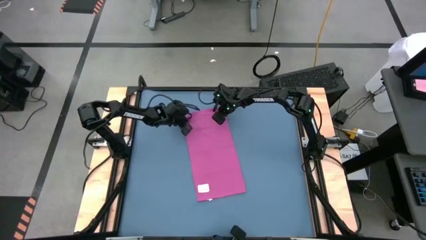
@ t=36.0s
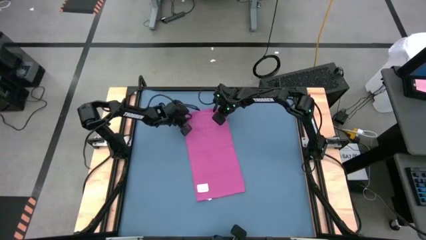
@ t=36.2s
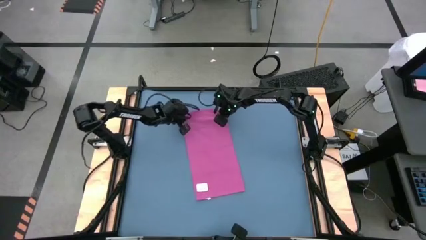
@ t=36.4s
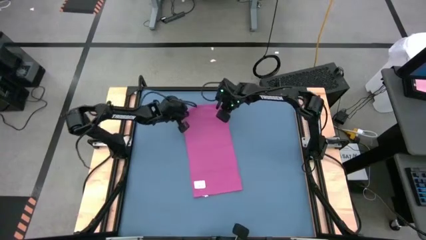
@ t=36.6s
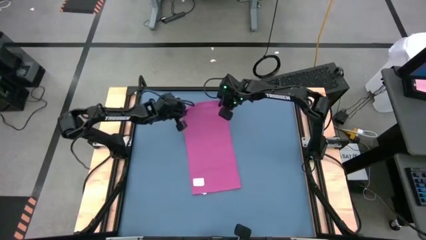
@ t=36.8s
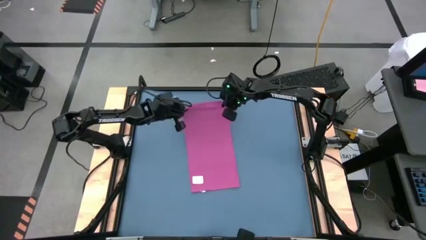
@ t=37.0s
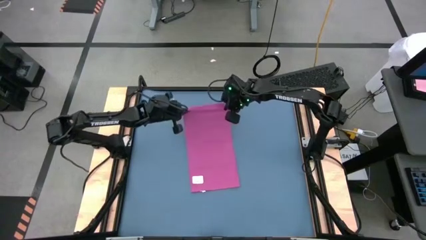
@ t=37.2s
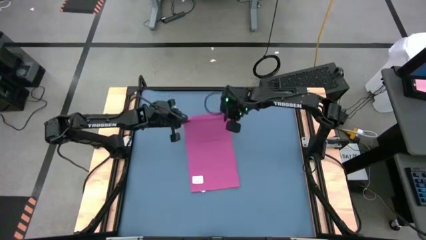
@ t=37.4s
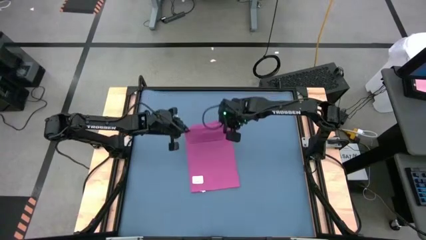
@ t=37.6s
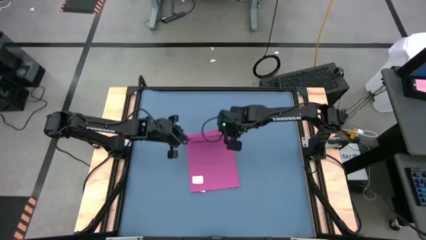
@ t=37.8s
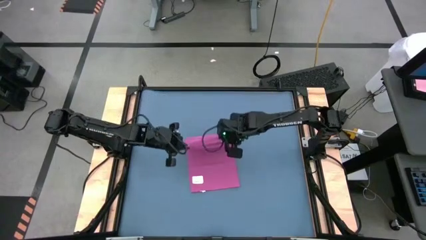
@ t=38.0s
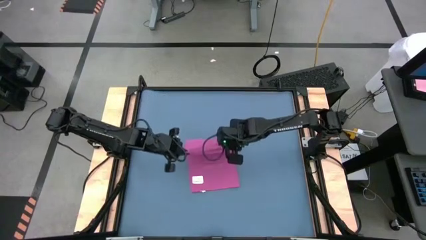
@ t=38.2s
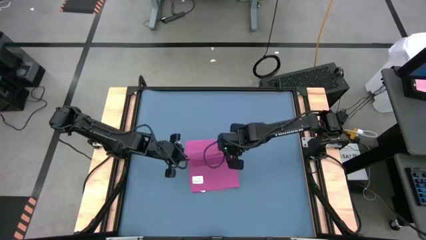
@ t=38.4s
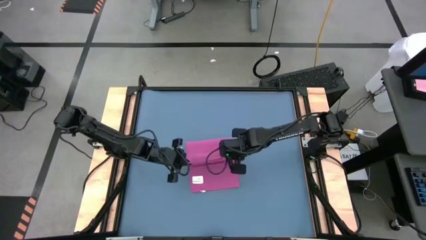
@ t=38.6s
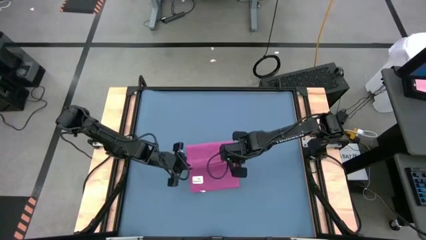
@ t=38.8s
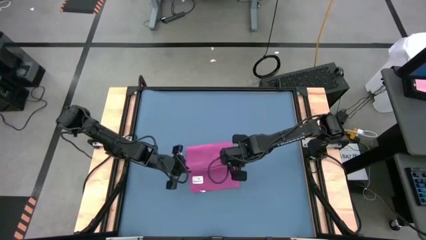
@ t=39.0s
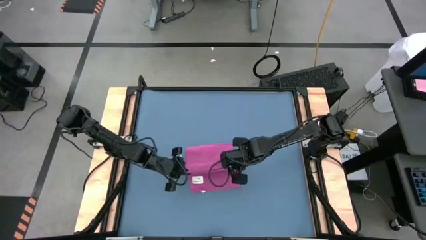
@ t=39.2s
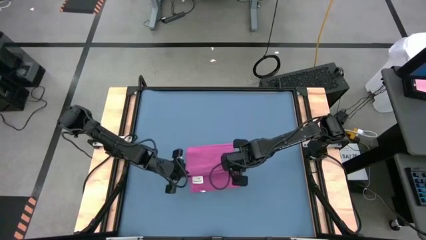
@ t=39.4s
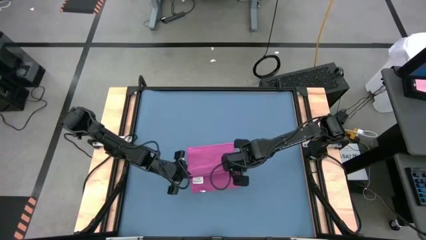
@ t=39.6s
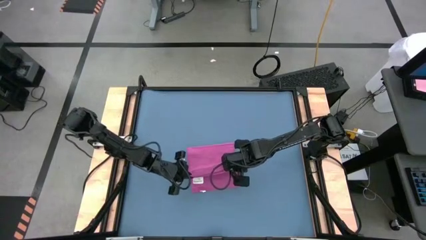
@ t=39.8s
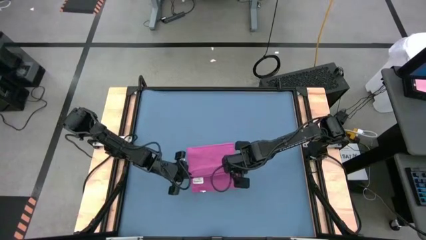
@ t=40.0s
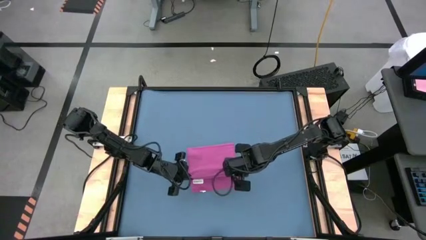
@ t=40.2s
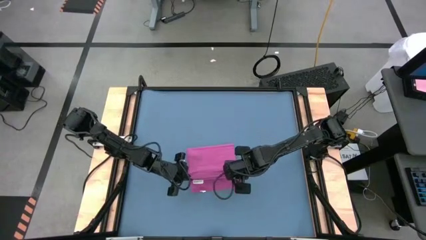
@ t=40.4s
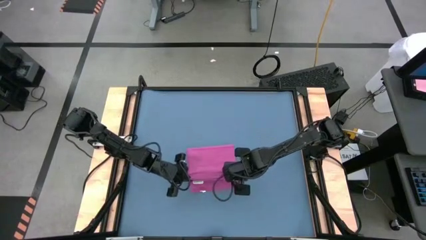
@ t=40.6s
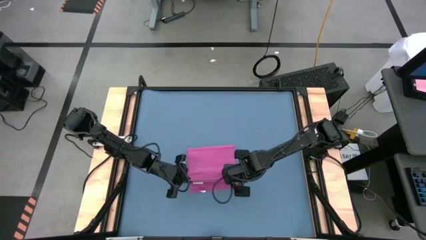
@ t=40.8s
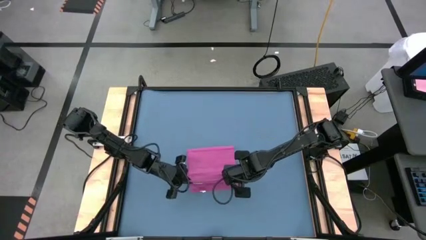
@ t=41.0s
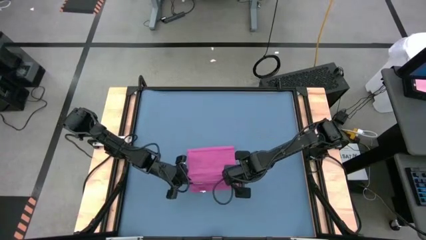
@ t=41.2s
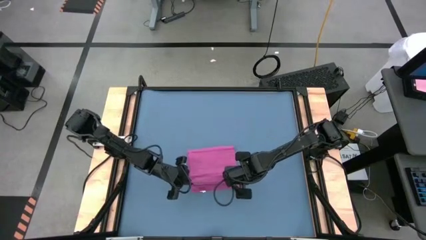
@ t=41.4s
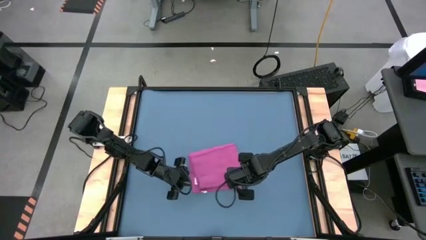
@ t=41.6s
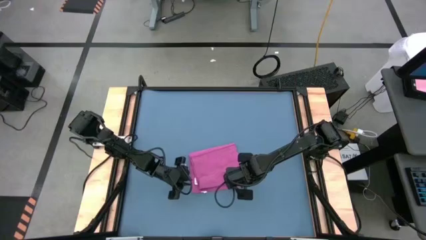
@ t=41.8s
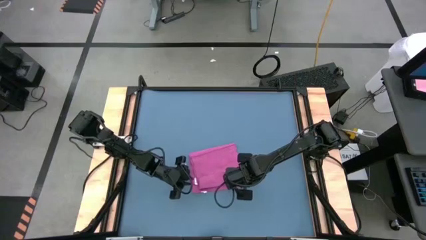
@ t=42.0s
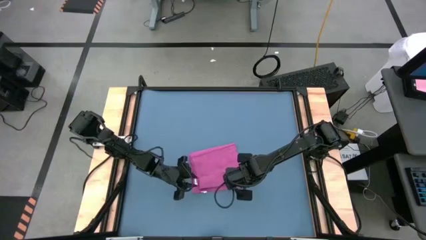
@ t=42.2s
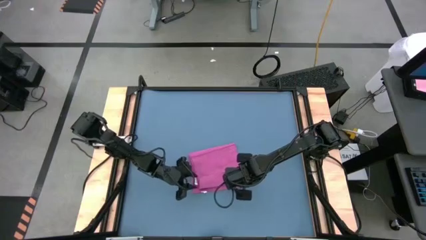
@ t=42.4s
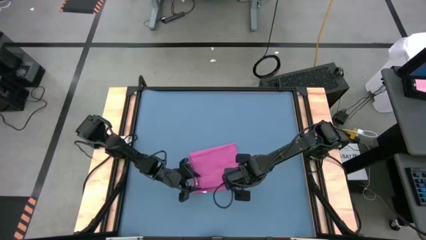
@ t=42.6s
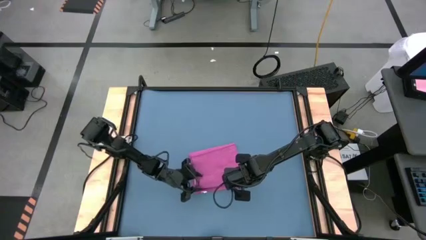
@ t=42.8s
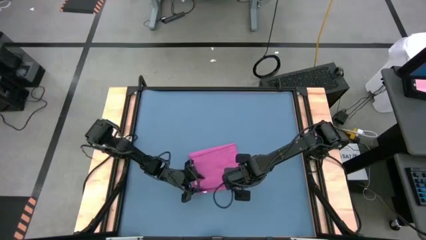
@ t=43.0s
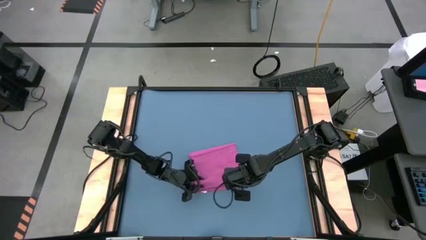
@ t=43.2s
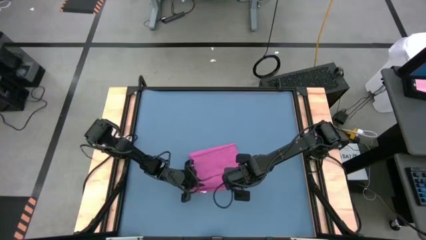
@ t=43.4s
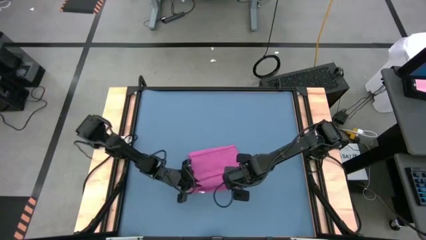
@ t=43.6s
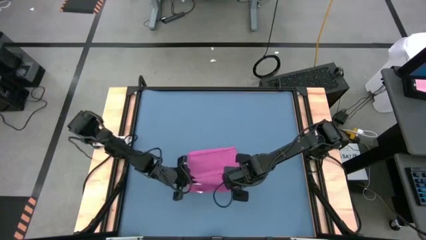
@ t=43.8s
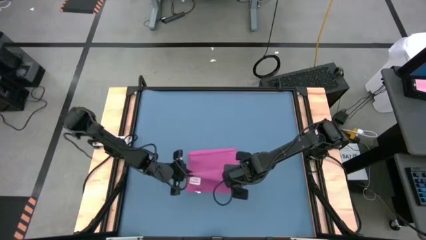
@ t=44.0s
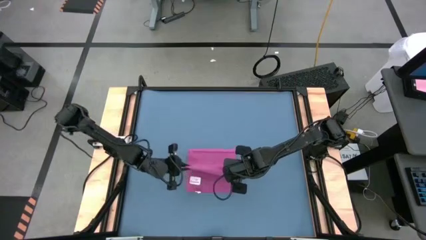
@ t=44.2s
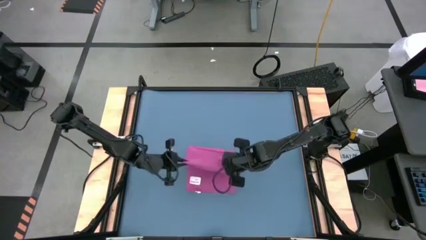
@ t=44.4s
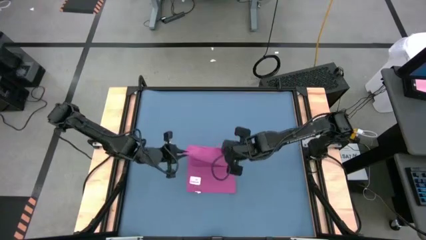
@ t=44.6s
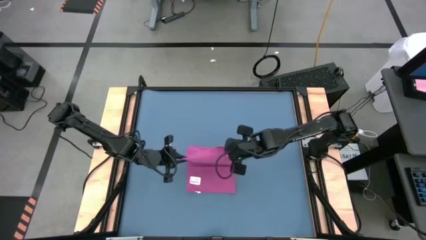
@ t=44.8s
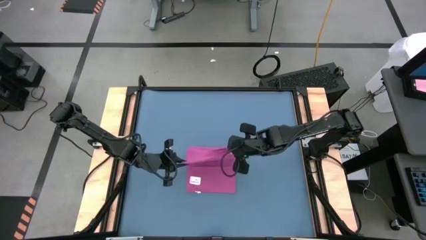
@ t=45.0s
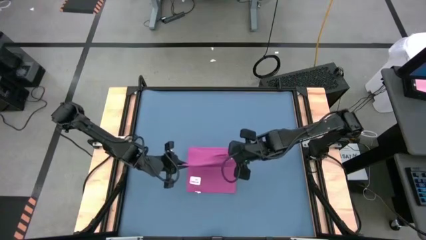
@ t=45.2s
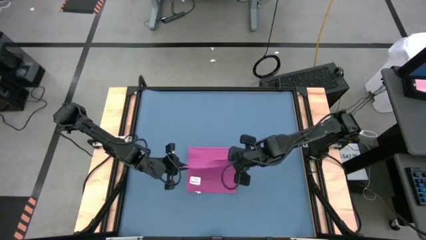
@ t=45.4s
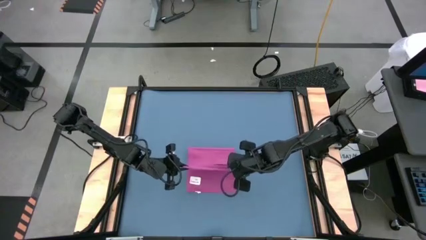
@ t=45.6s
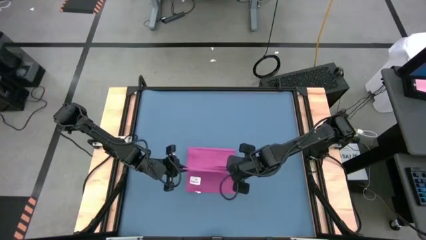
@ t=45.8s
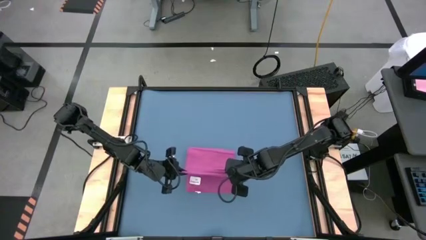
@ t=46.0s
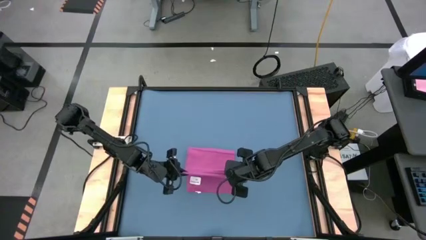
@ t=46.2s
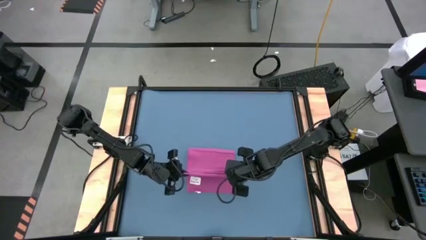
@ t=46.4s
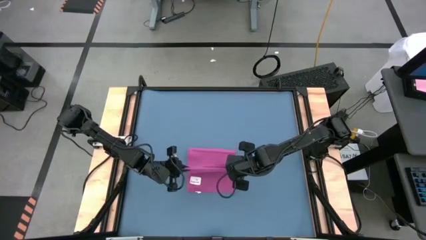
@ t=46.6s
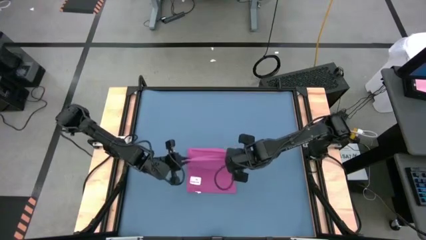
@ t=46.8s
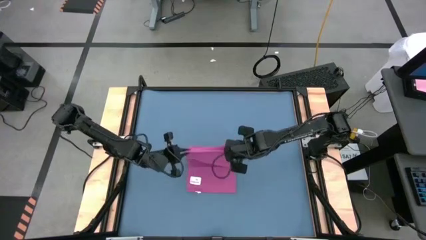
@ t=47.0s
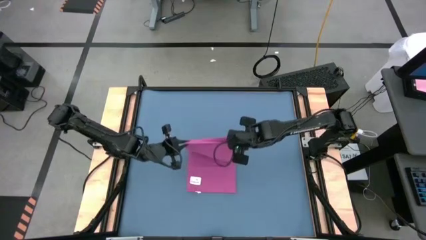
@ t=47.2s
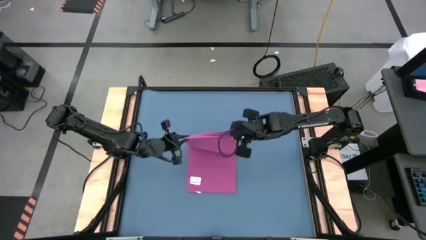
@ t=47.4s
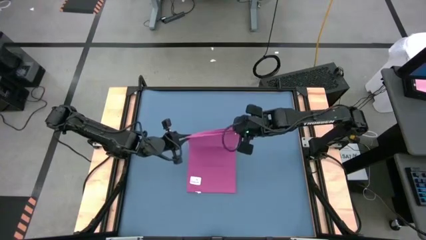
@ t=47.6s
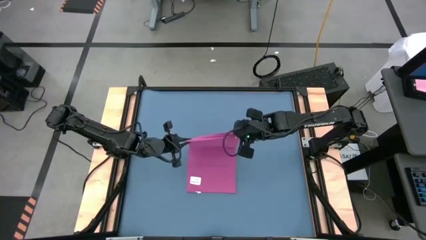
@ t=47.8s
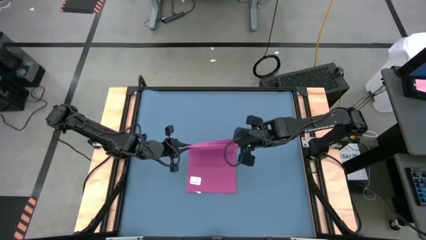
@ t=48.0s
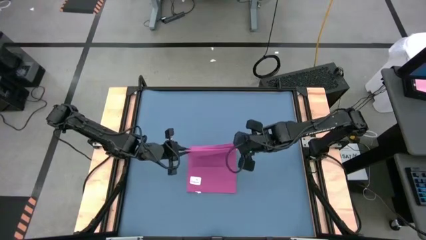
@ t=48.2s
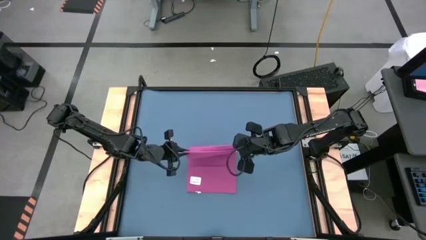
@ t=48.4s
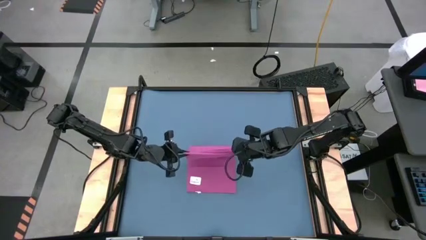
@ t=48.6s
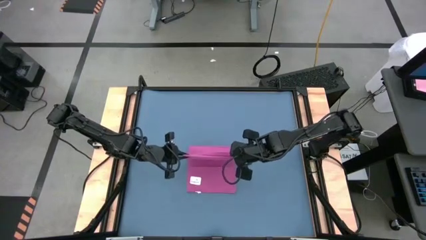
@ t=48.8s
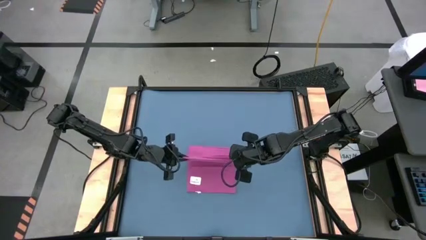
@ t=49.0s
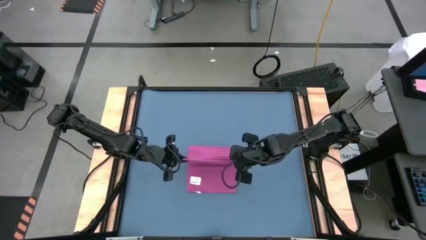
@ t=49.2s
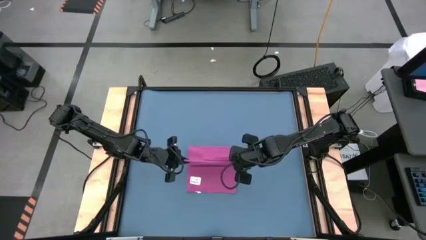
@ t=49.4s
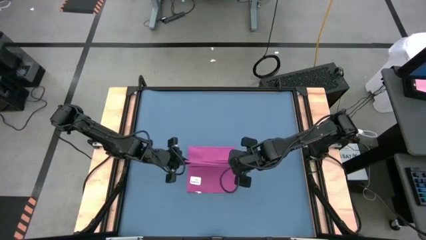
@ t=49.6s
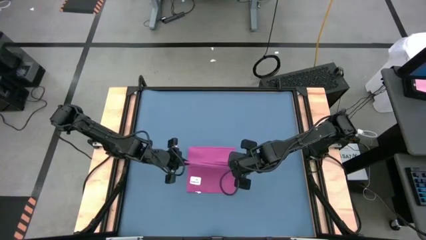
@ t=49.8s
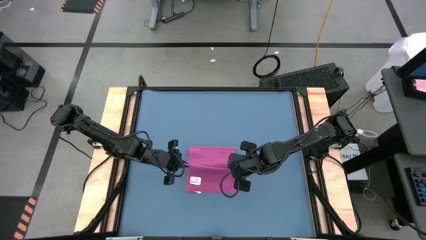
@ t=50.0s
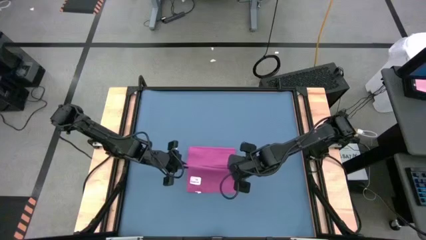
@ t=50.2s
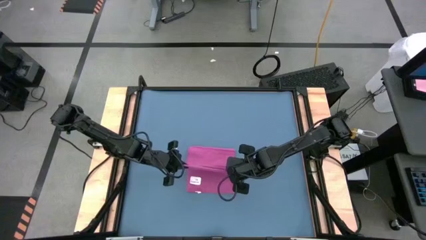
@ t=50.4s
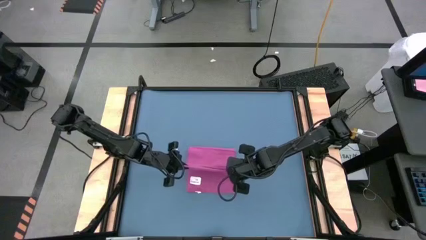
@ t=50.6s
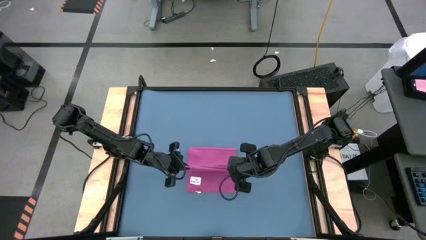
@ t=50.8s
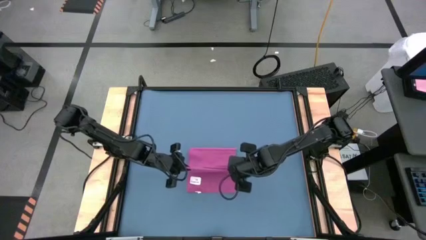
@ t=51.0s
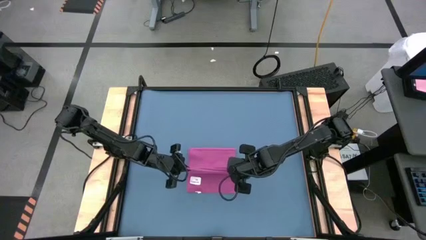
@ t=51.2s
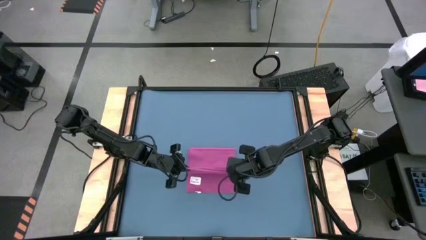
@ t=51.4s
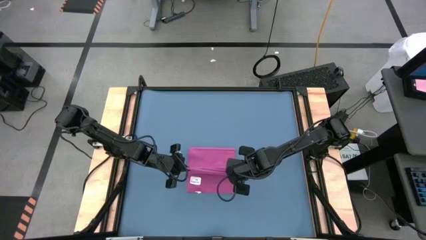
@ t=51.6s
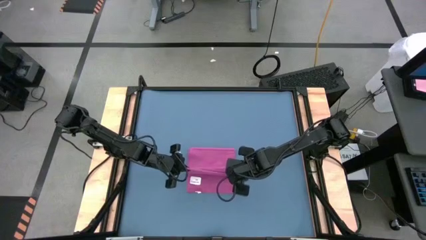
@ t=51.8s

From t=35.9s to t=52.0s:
Task: Roll towel
Fold the light red towel
